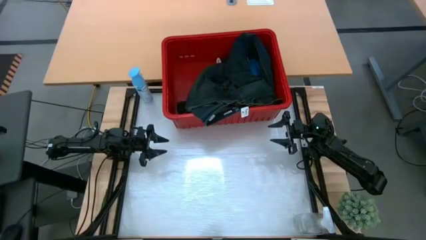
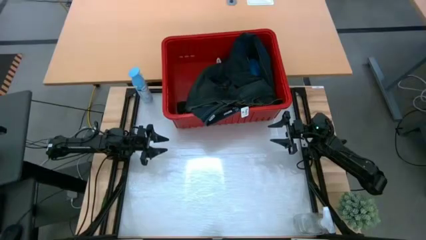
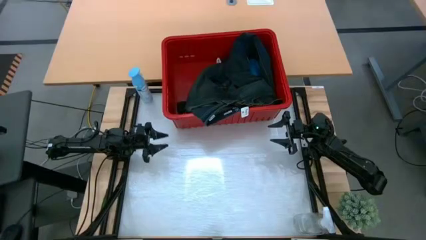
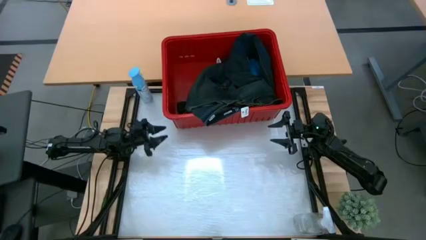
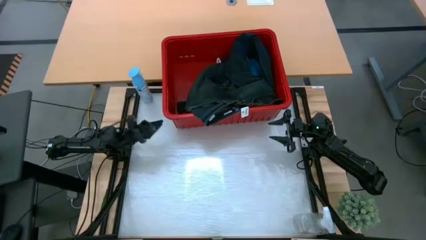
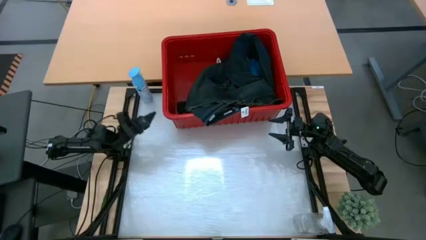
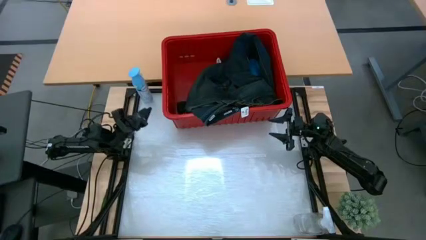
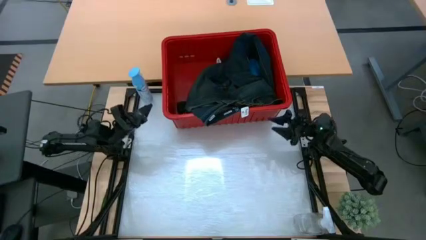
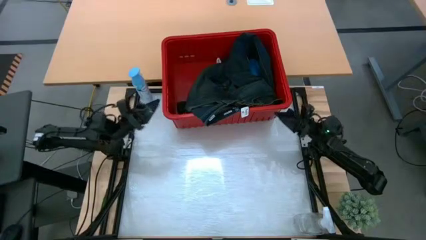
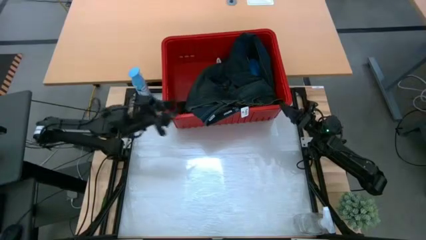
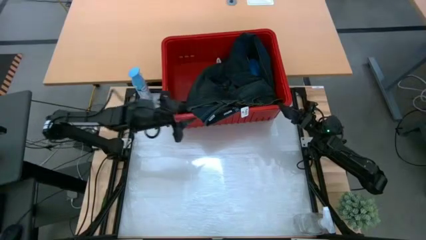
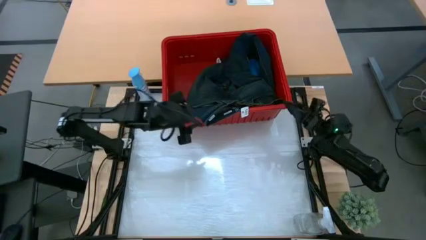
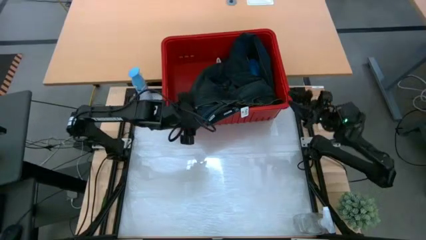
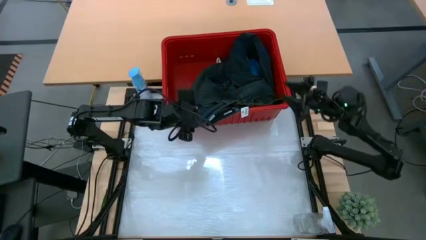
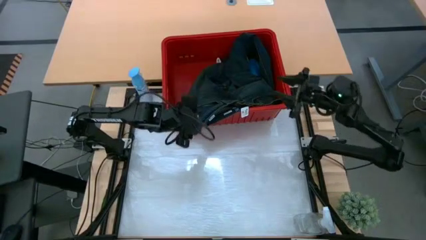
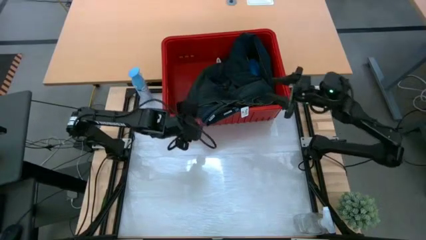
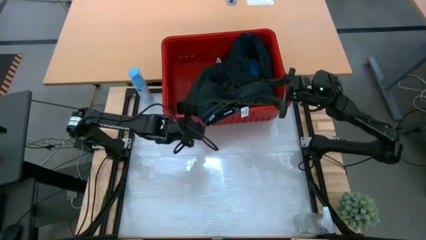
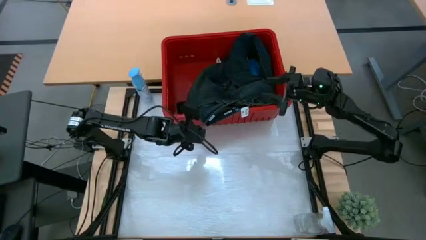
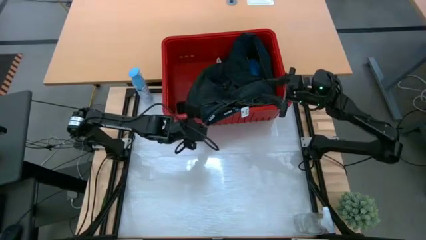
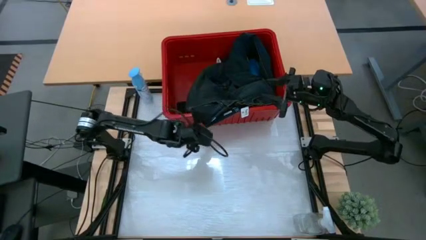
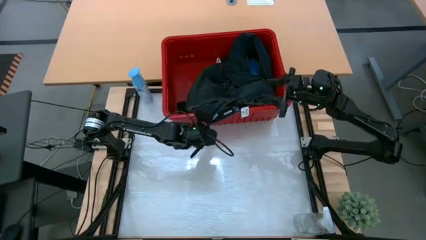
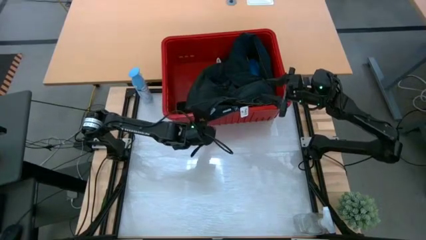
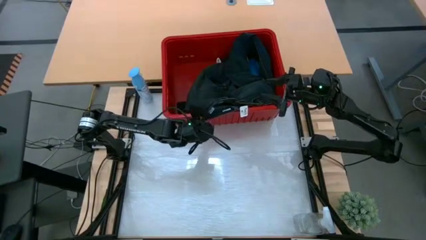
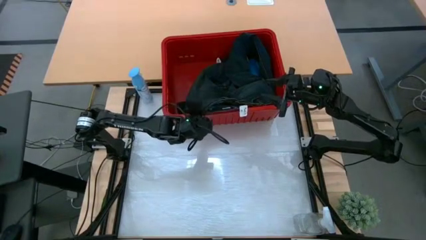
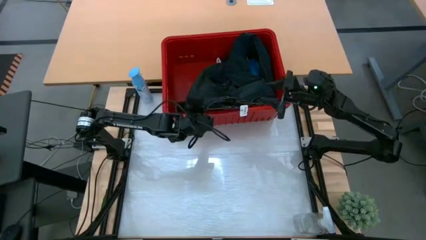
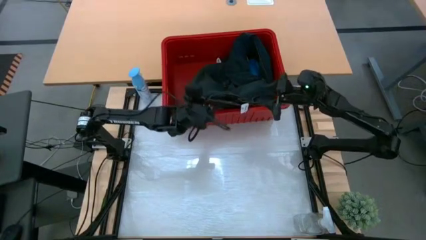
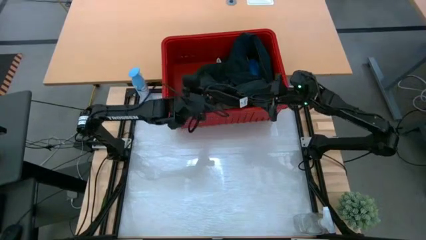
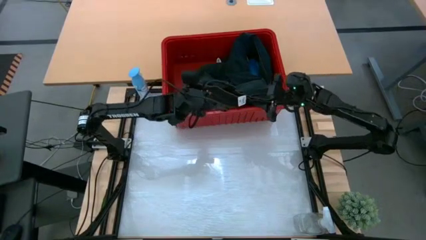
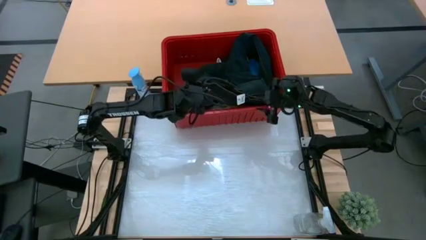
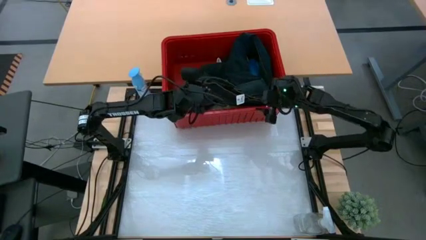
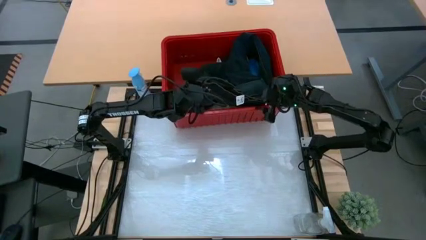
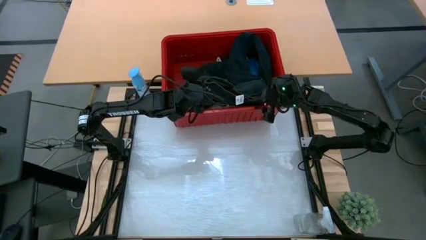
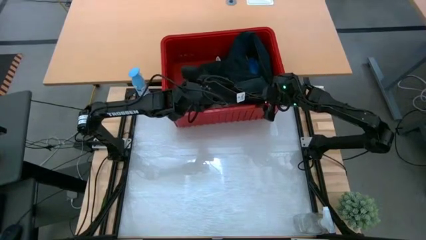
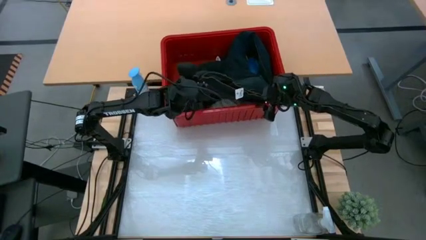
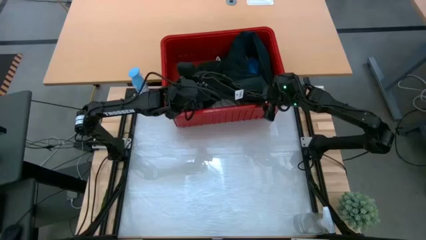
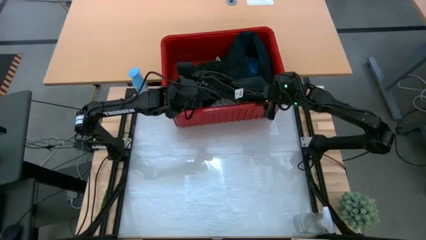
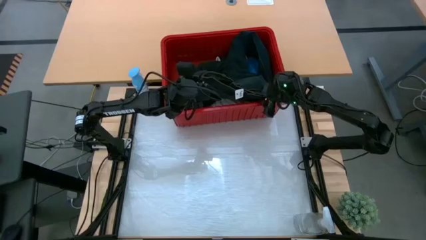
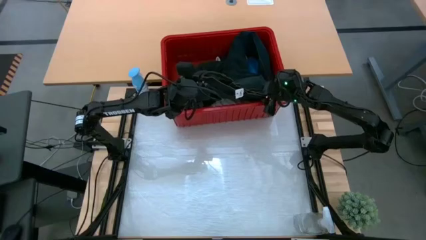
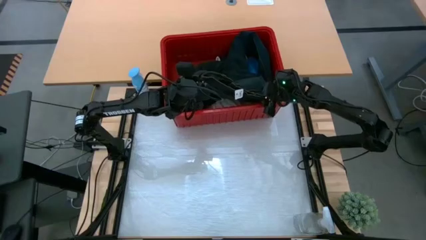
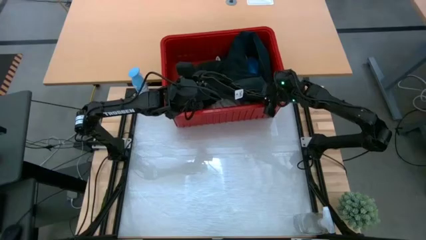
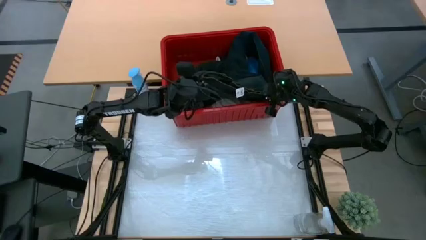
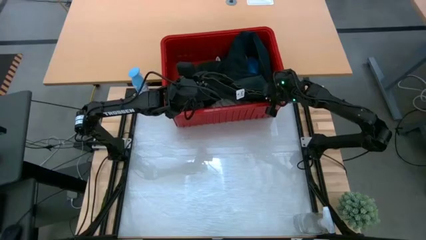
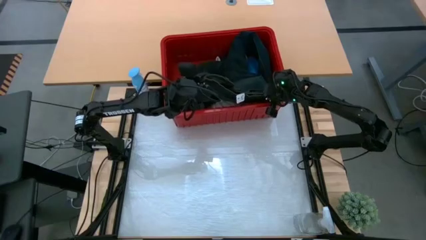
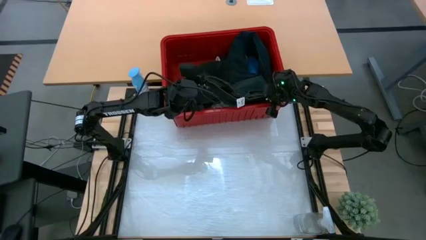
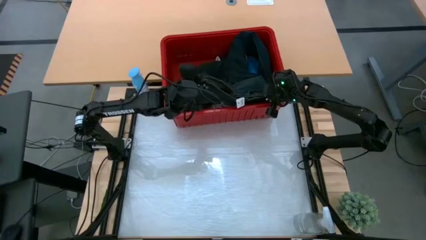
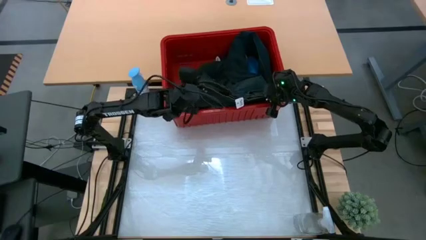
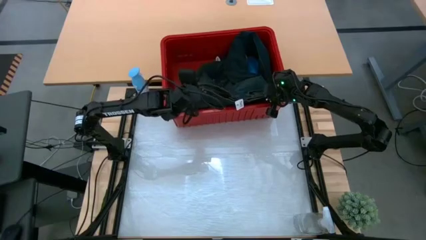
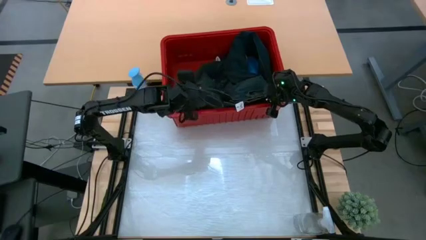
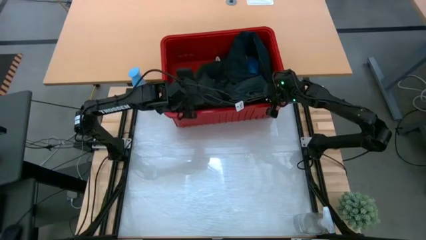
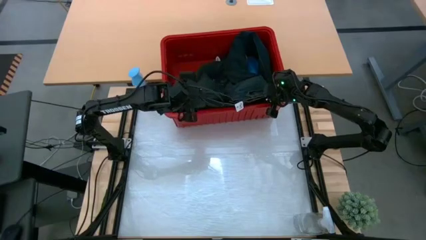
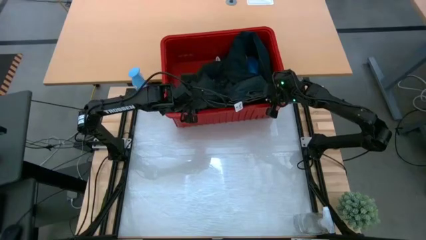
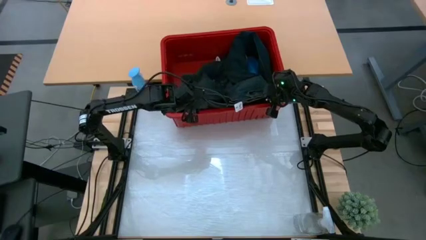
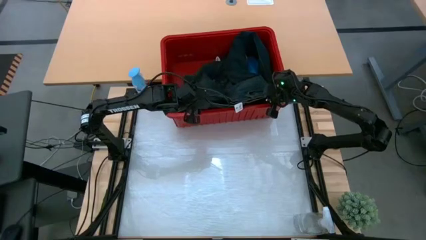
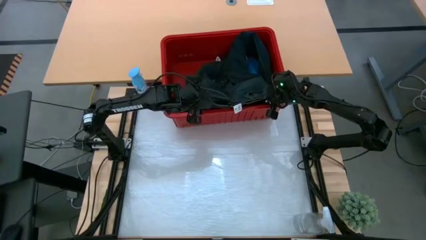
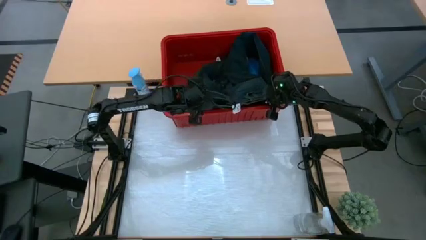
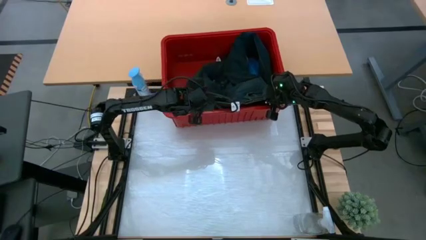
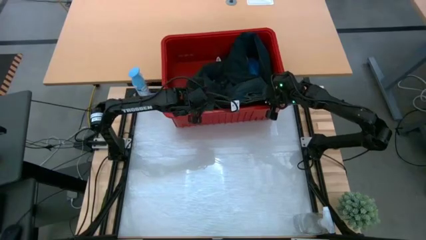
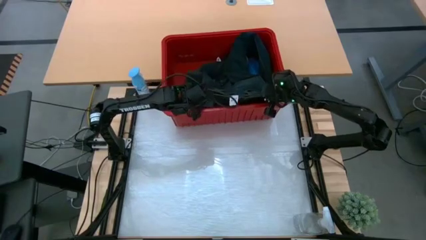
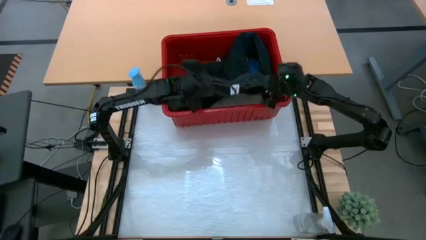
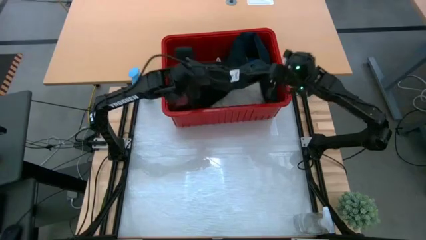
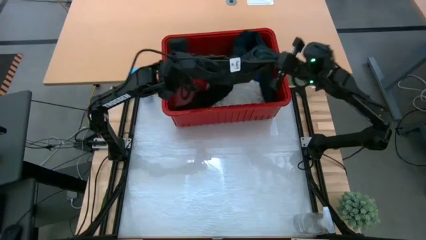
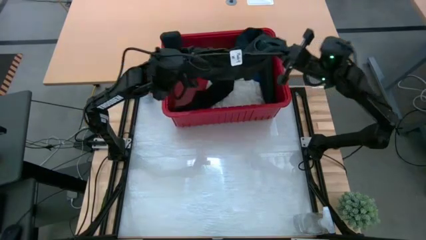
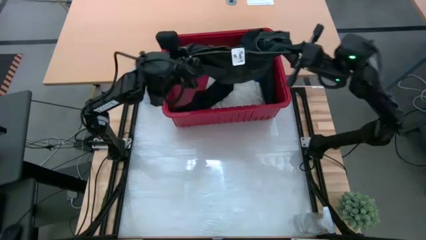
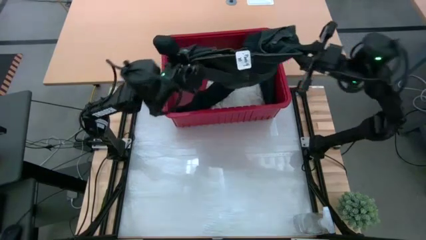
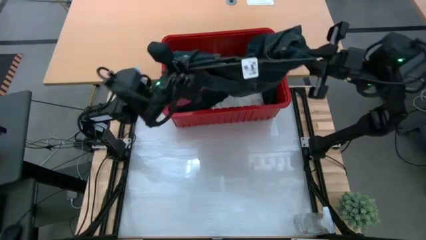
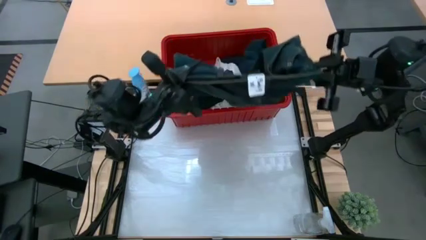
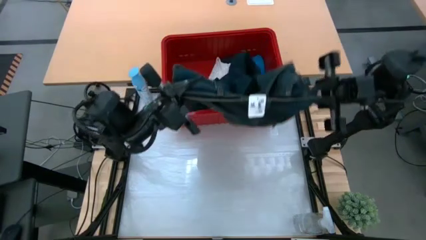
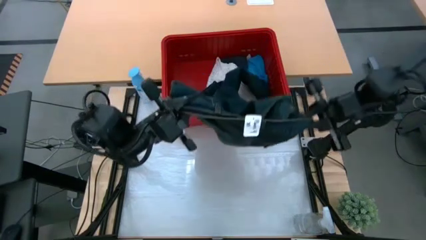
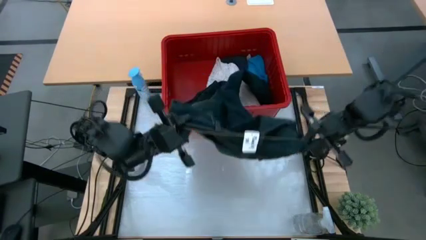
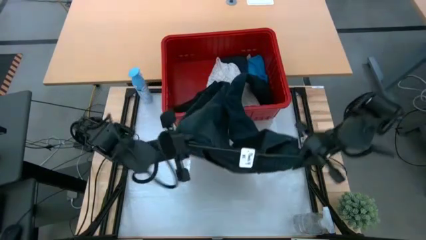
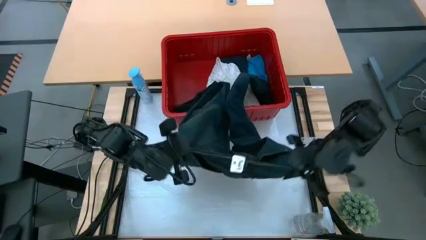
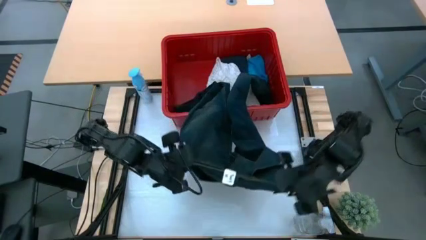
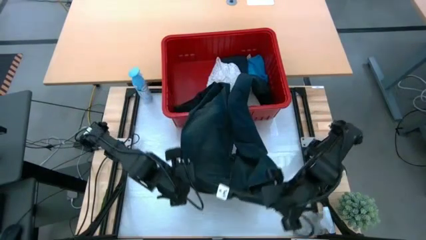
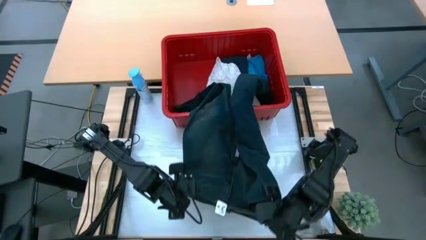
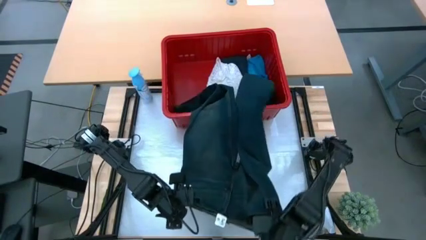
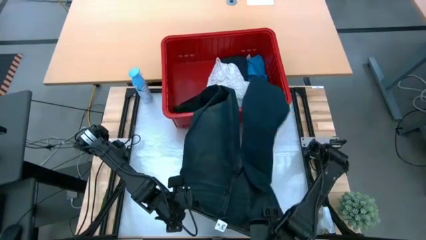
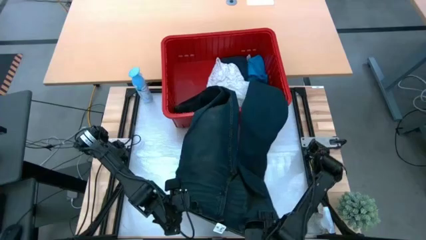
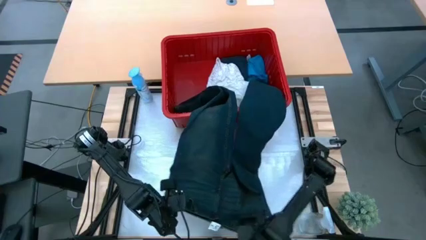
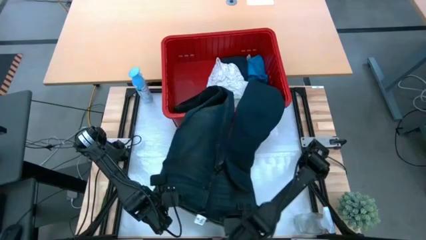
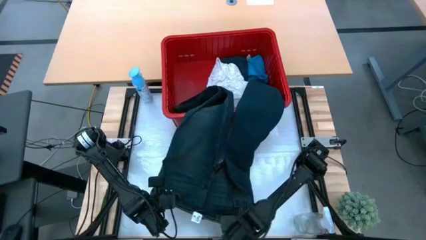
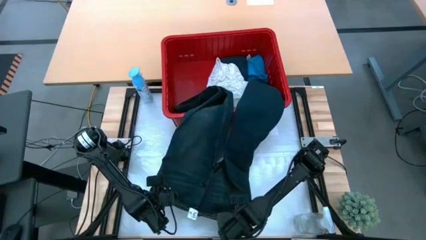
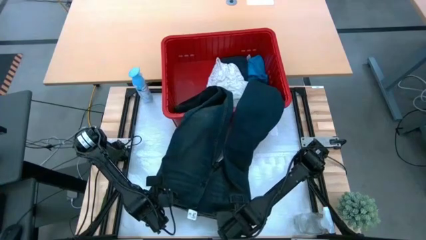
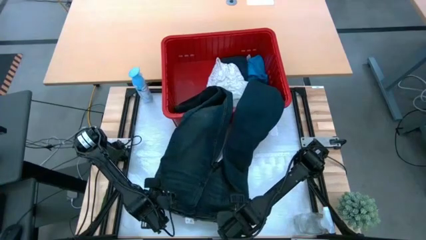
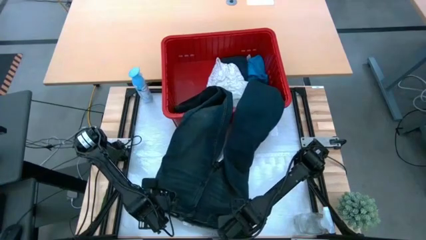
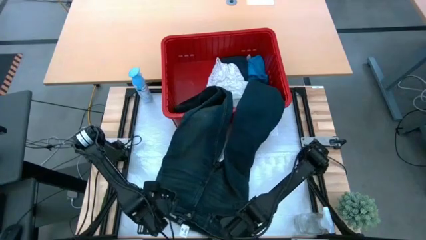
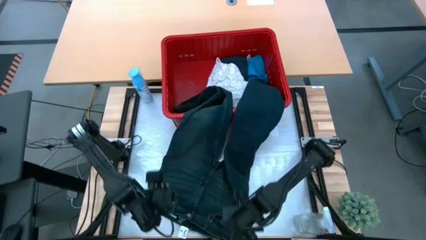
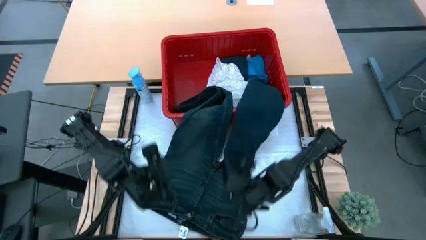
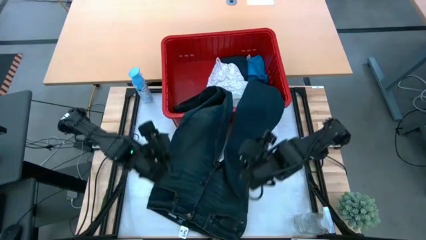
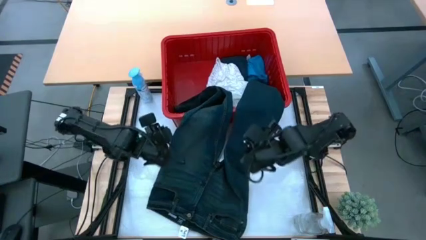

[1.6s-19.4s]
Task: Fold Laundry from Bin
Fold the black pants from the red bin
